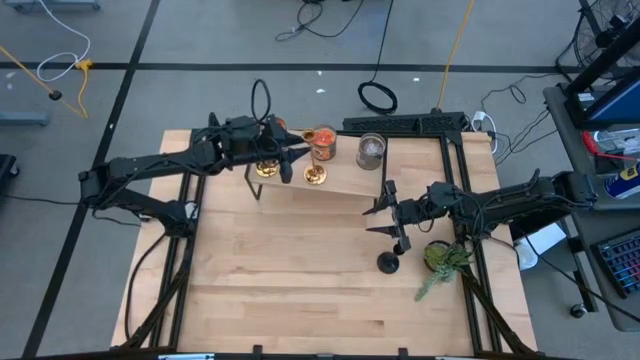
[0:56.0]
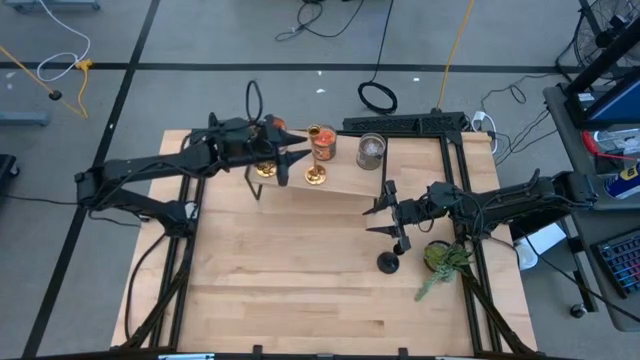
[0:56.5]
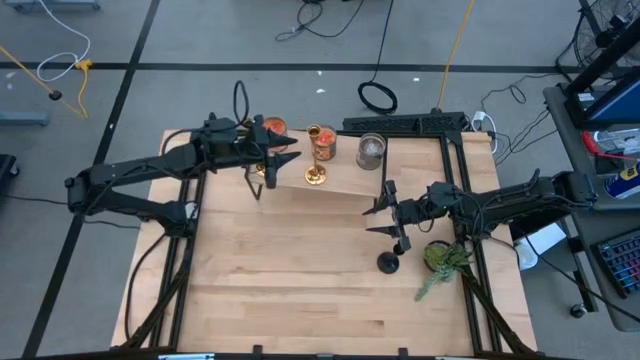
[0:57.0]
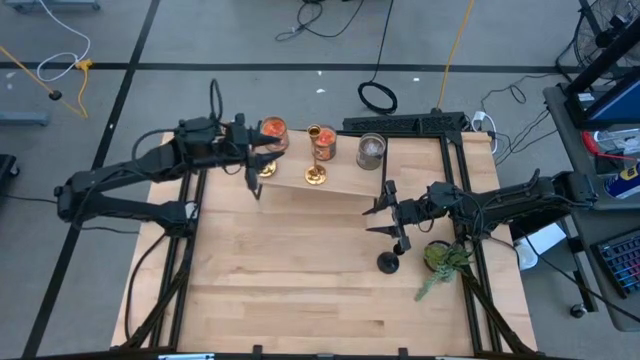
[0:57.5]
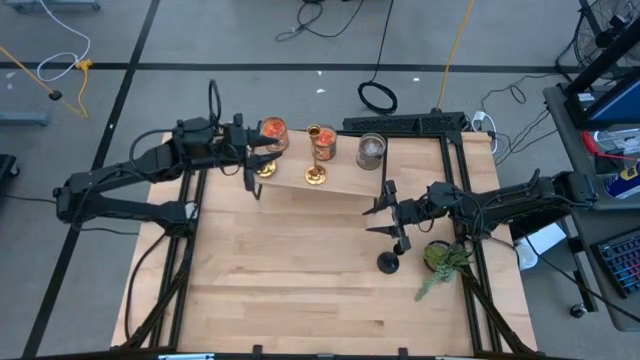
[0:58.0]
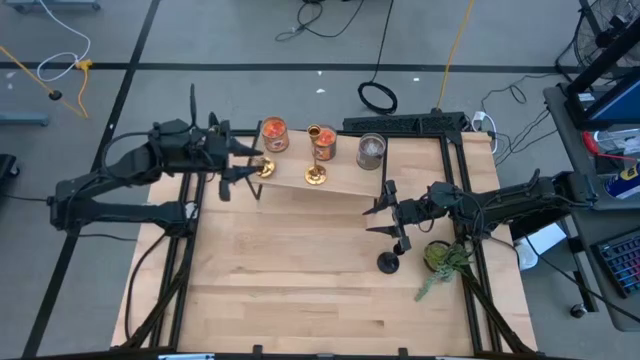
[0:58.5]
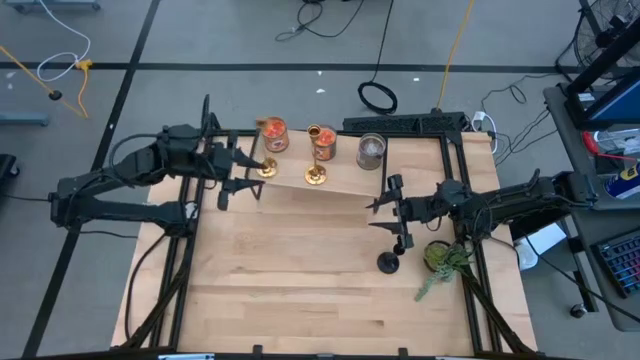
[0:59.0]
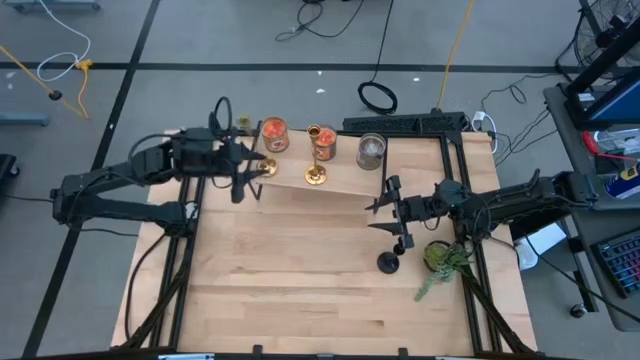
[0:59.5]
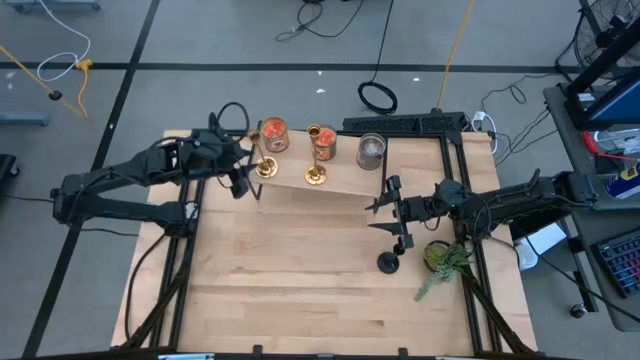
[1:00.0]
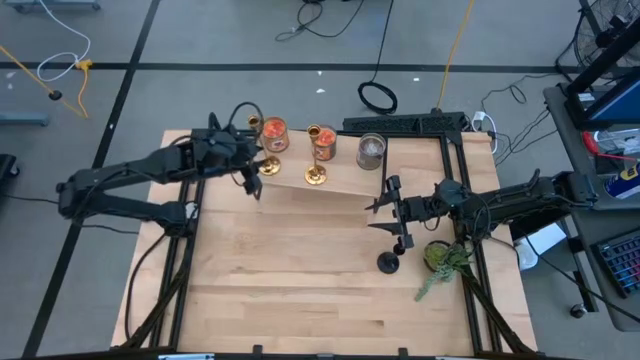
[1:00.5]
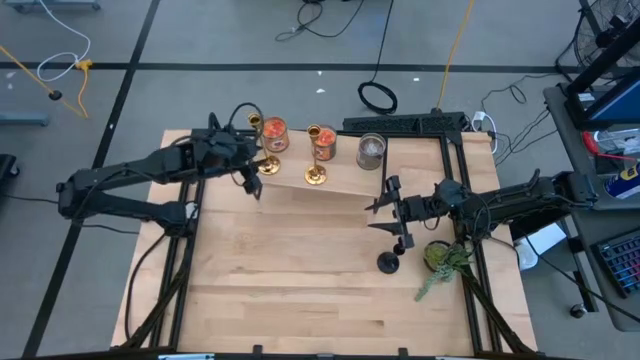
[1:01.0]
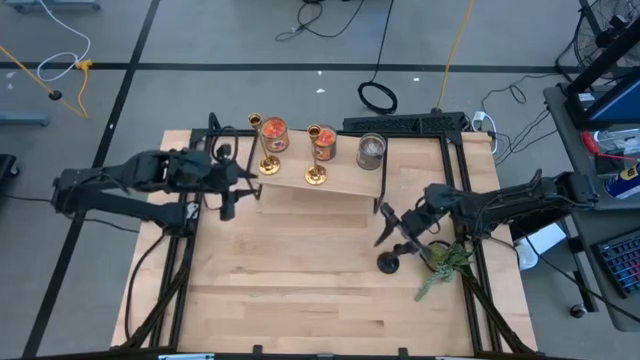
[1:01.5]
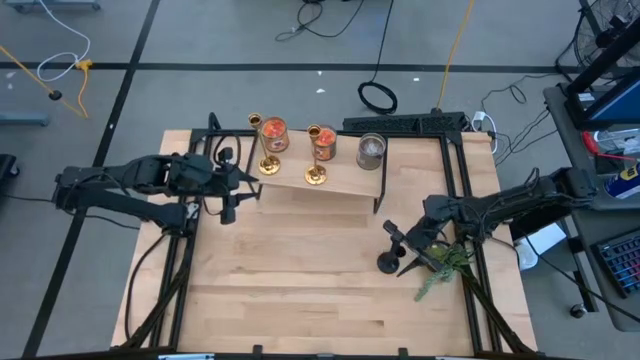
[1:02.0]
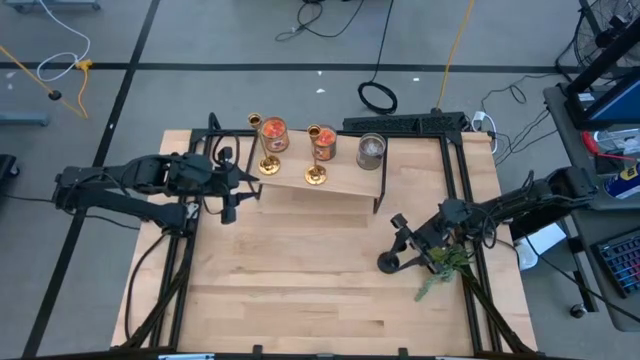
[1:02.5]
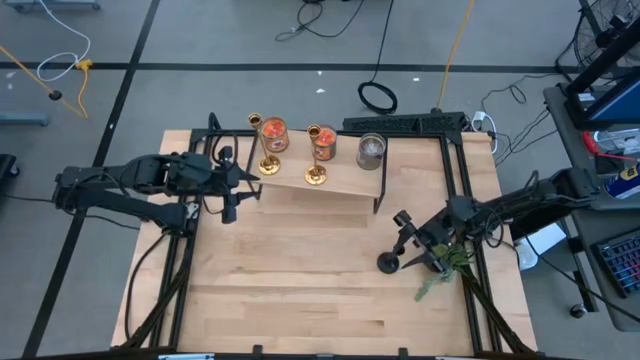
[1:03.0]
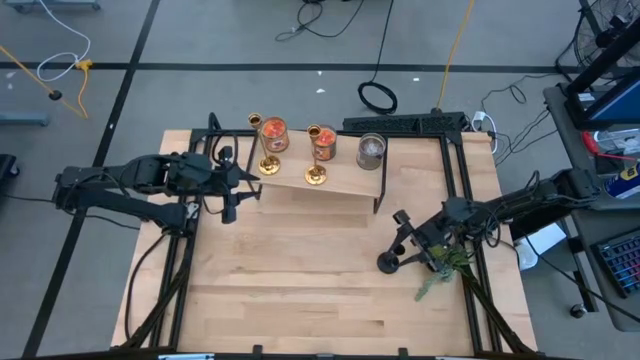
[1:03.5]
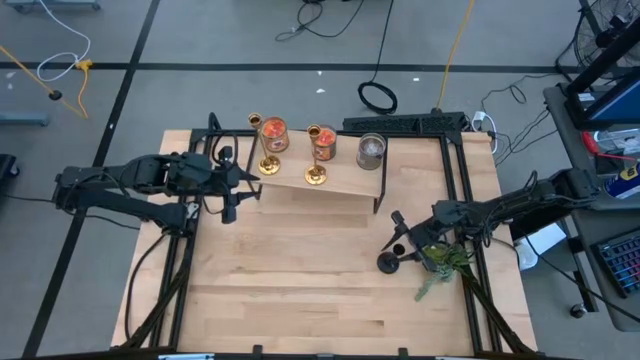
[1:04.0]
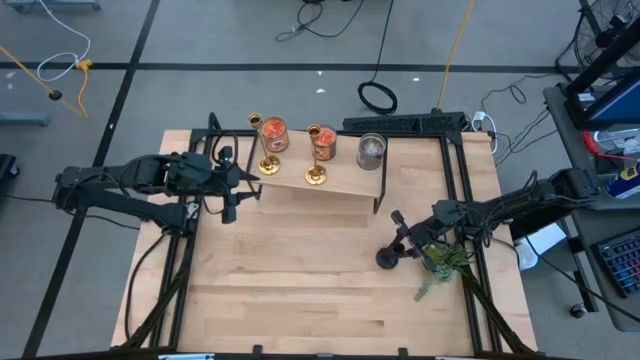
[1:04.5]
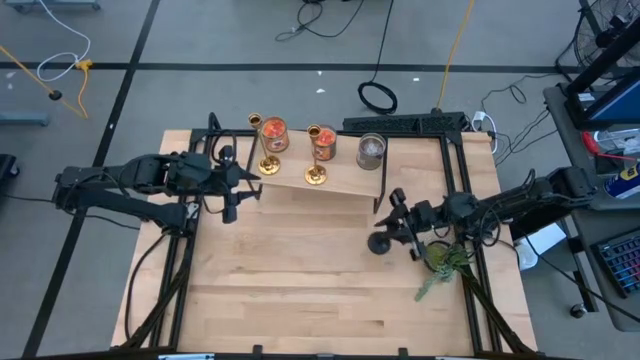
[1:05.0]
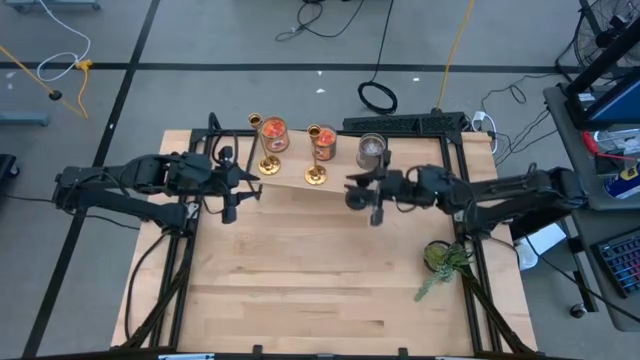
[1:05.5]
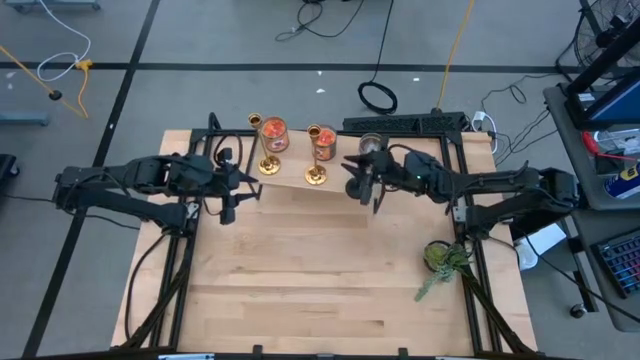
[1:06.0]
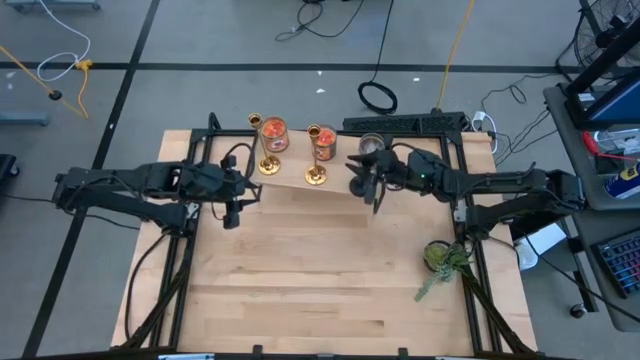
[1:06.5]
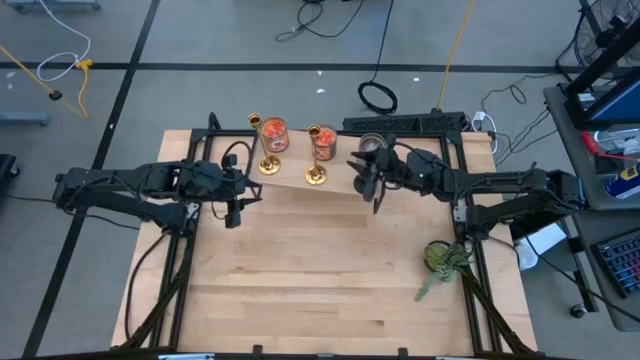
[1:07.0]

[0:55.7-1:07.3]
Task: Pick & Place candle stick holders
Put the black candle holder on the shelf

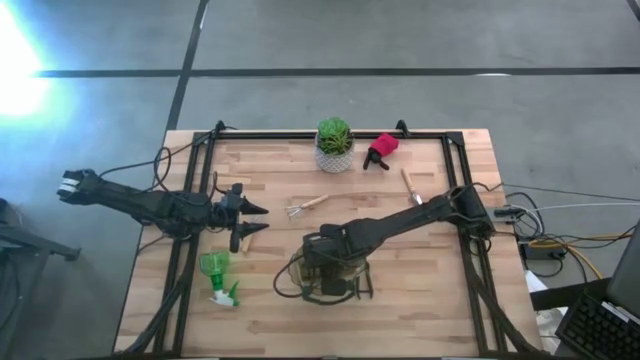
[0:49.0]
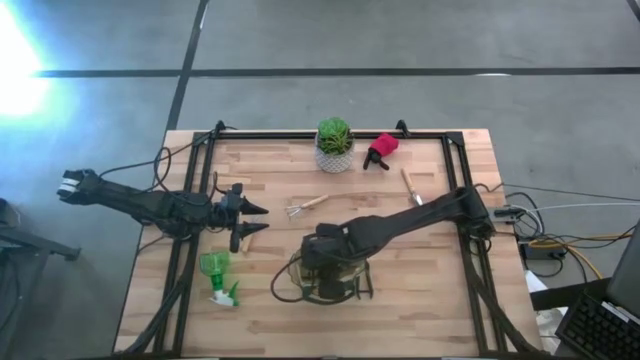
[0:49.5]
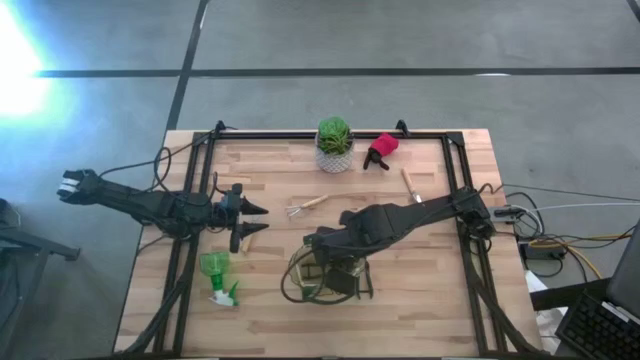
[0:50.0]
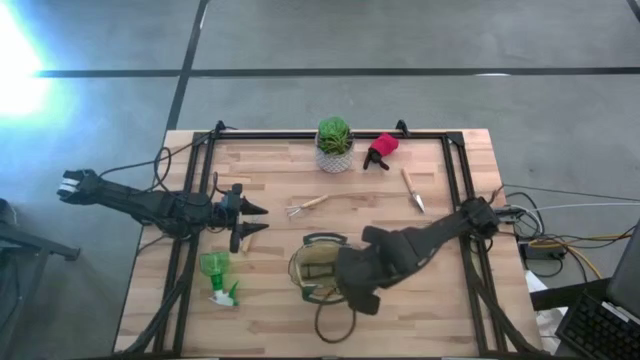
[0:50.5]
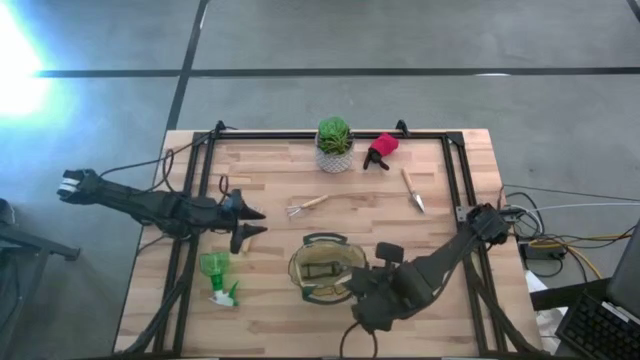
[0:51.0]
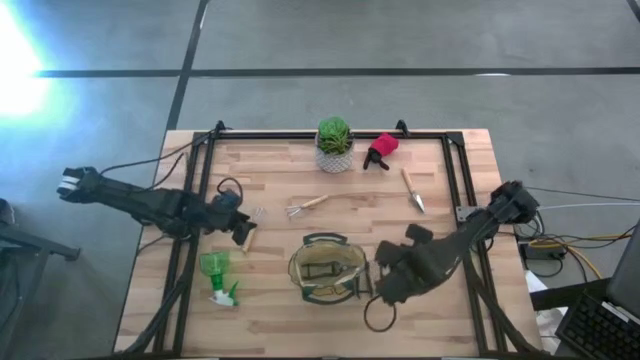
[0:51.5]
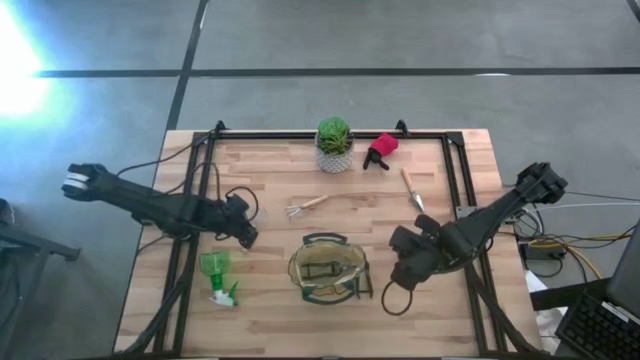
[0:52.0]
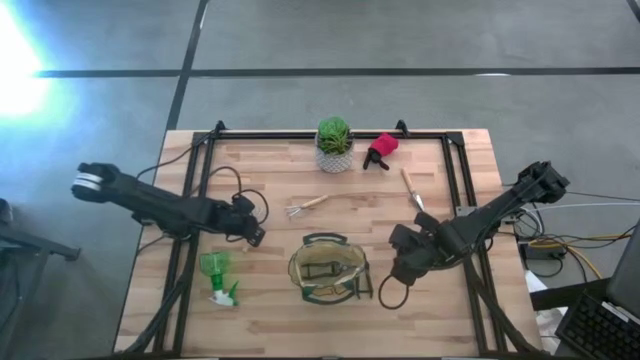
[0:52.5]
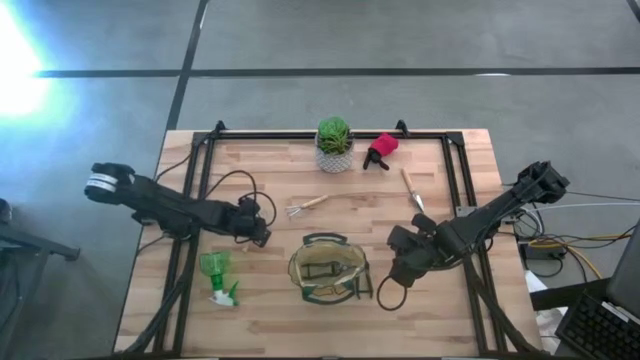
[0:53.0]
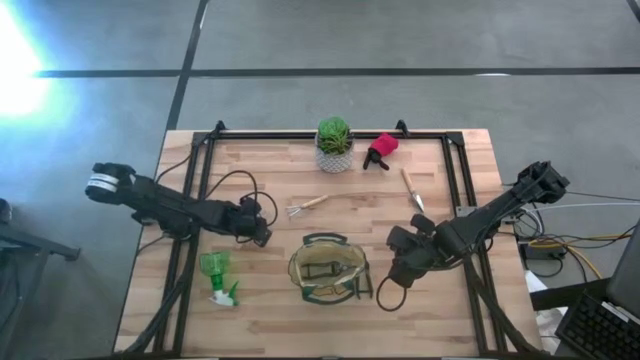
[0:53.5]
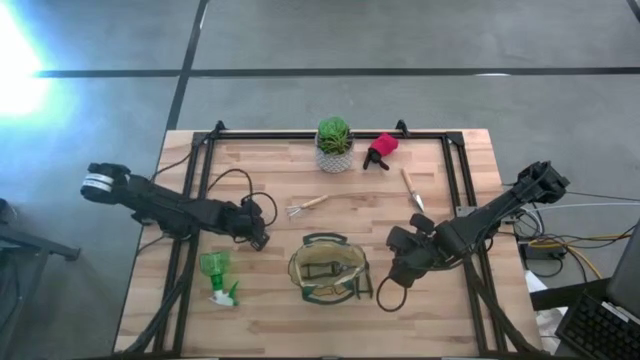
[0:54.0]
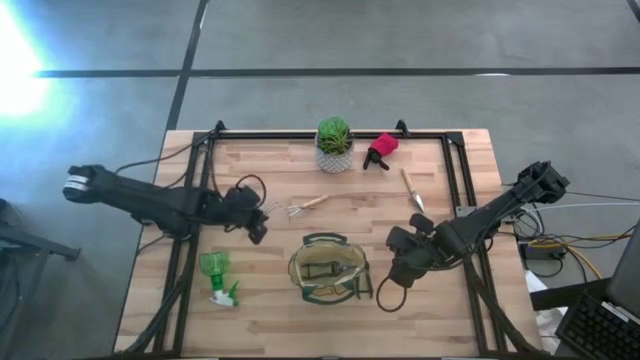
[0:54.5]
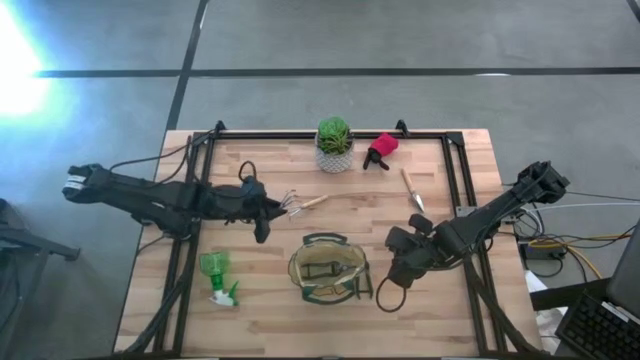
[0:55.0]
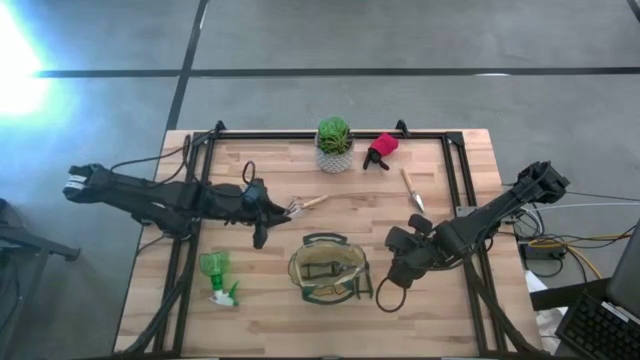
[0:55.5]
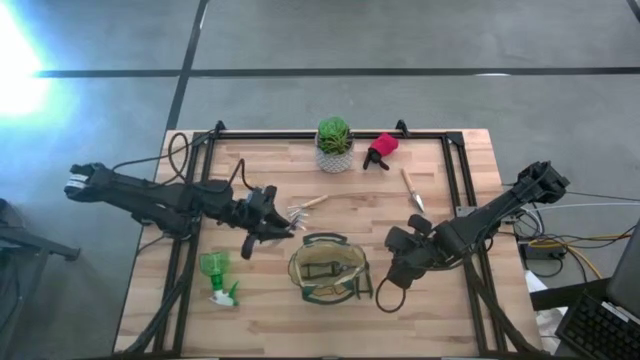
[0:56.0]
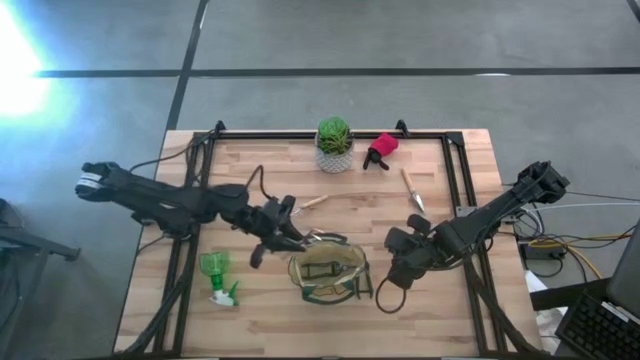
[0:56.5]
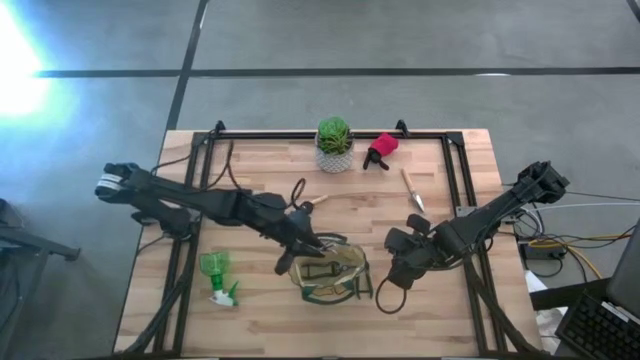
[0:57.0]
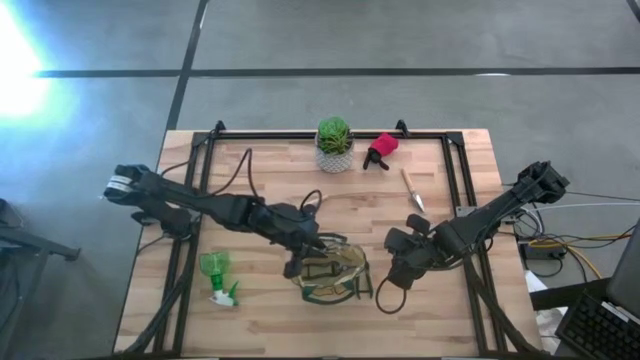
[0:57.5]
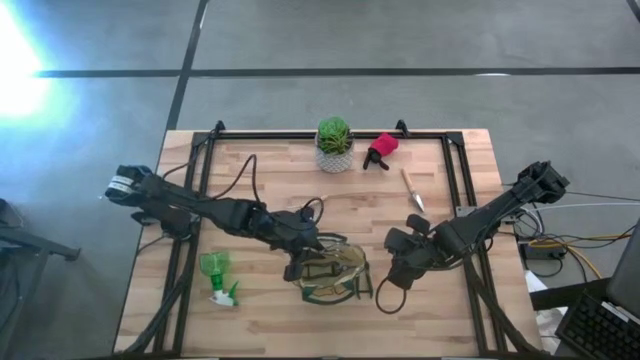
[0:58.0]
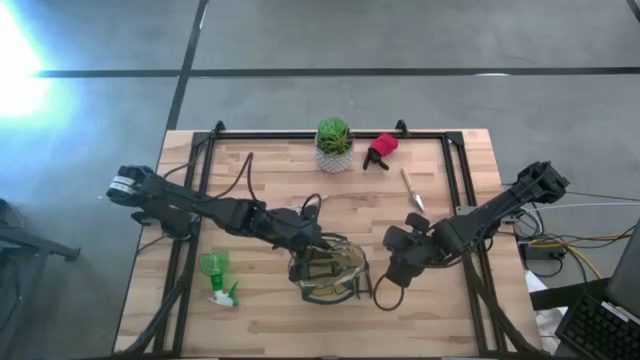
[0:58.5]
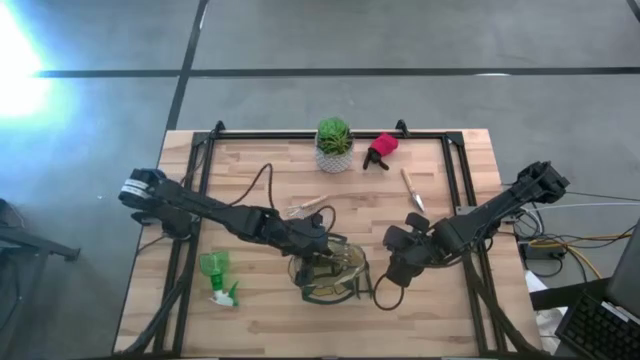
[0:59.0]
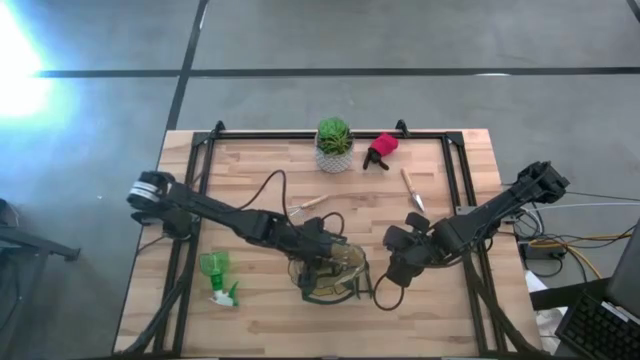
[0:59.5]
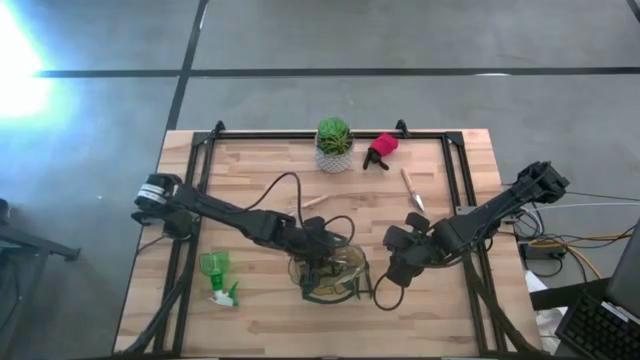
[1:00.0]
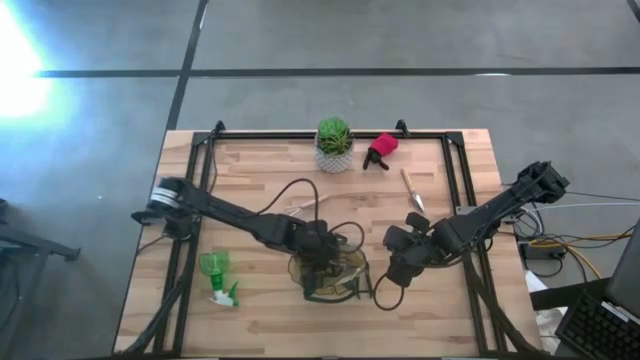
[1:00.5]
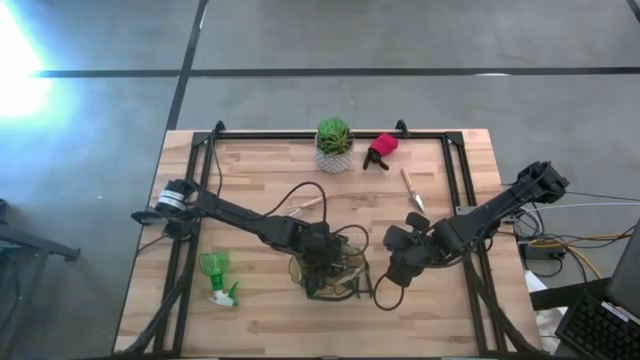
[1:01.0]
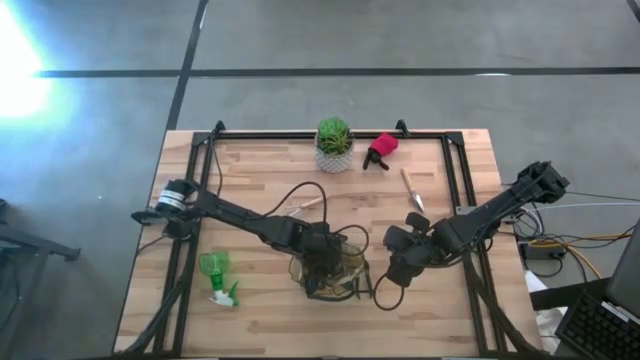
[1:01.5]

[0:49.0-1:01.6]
Task: Pick & Place Garden tools in Gardening bag
Put the left brown hand rake into the white gardening bag
